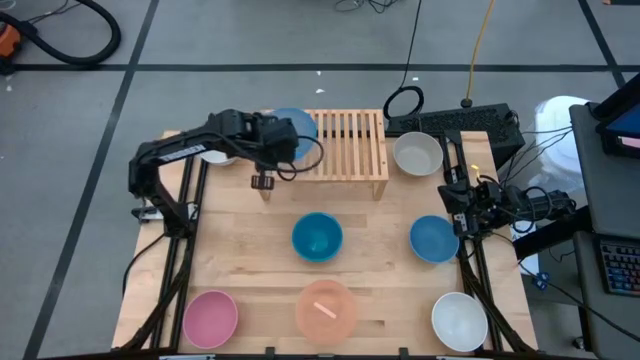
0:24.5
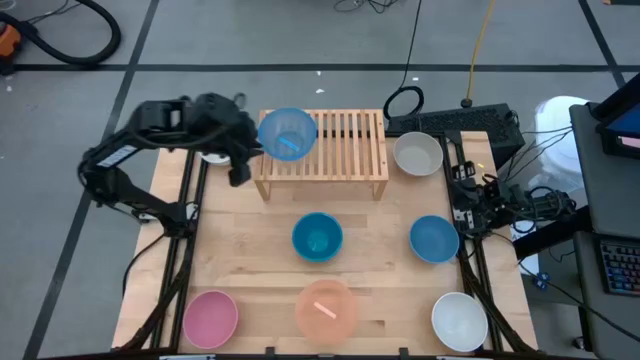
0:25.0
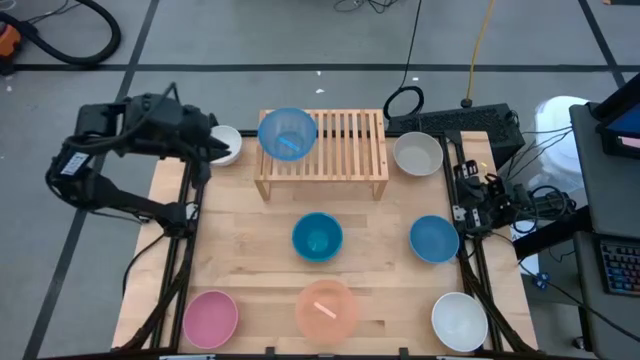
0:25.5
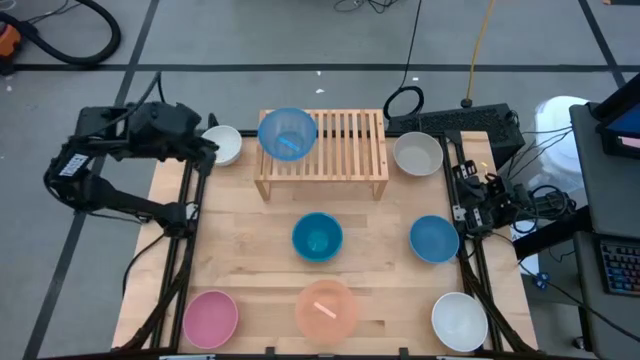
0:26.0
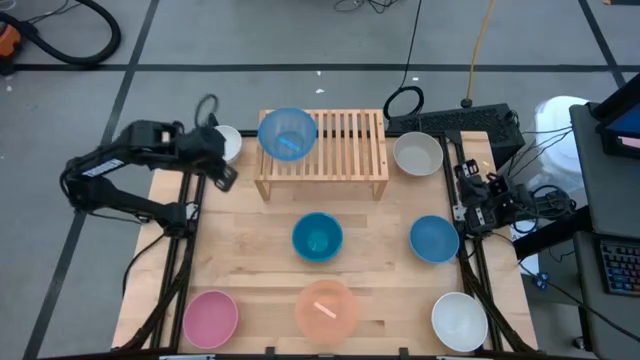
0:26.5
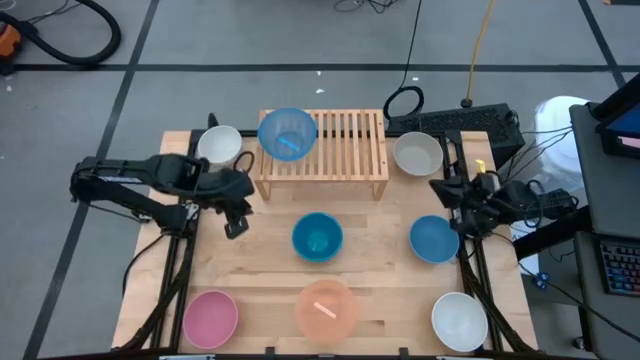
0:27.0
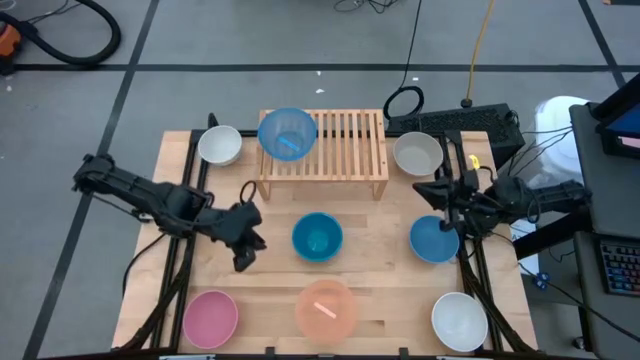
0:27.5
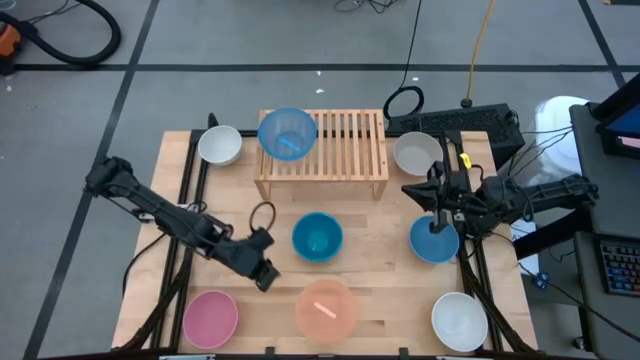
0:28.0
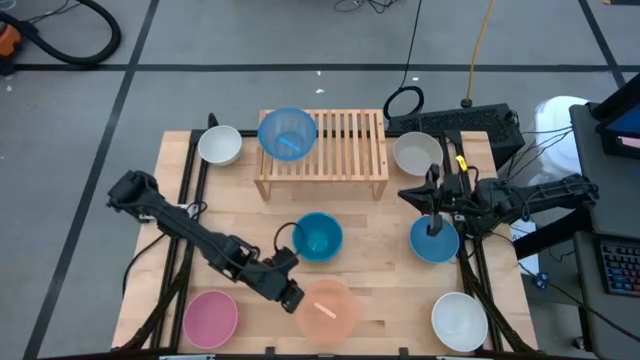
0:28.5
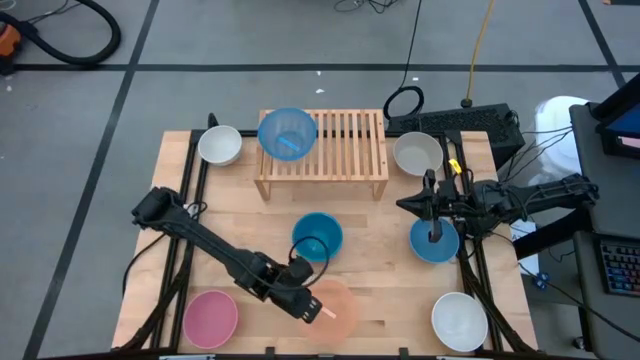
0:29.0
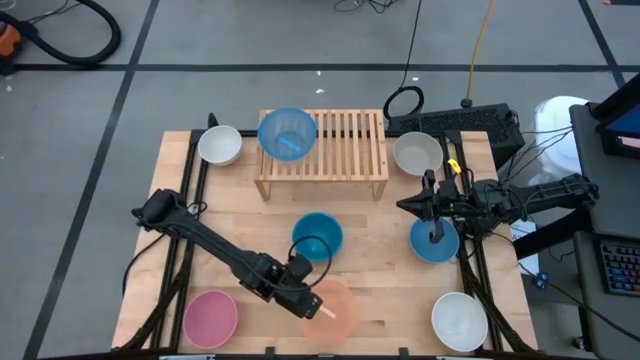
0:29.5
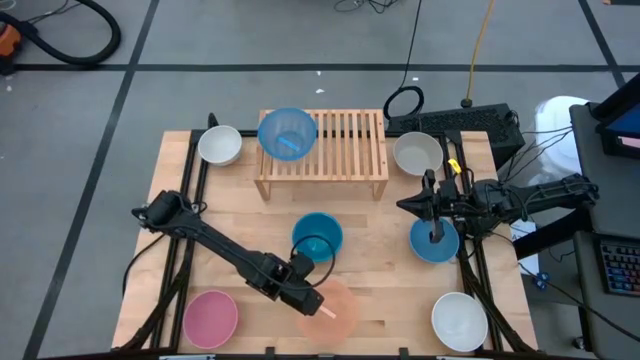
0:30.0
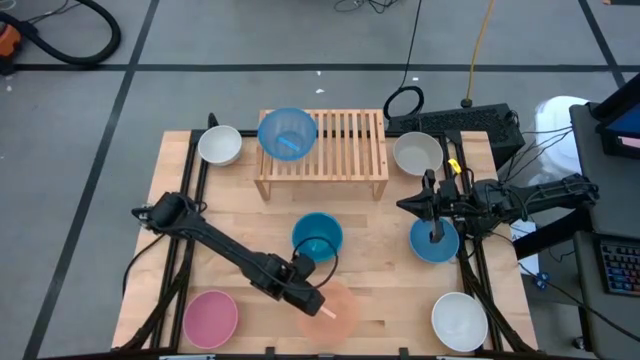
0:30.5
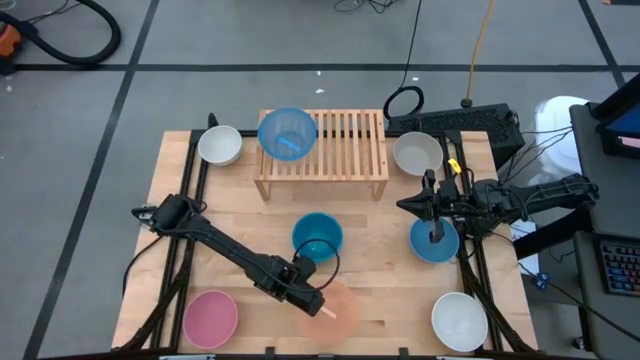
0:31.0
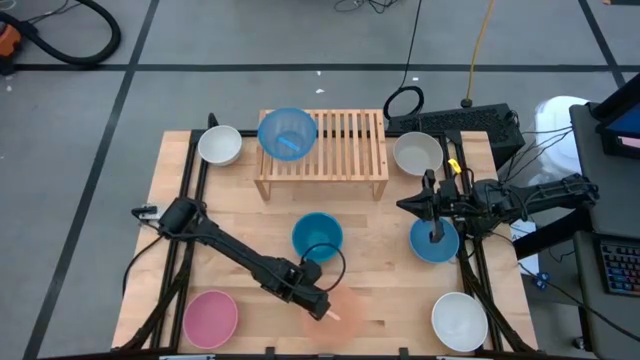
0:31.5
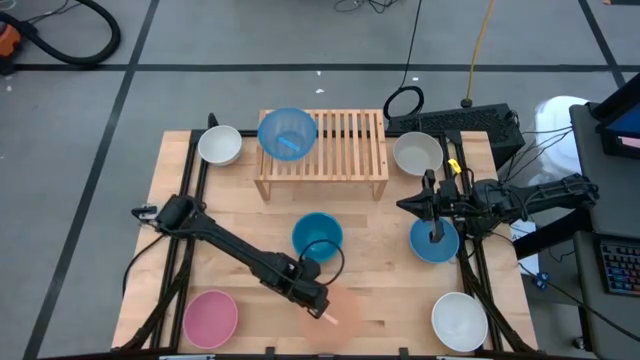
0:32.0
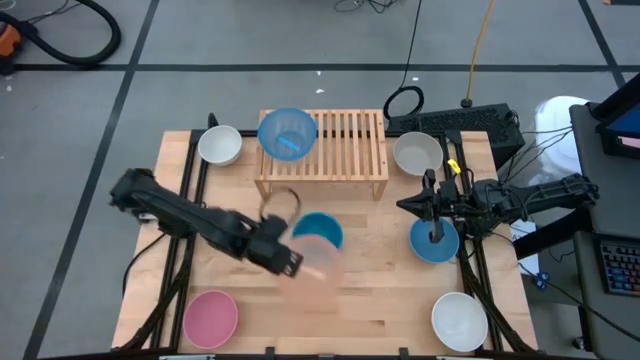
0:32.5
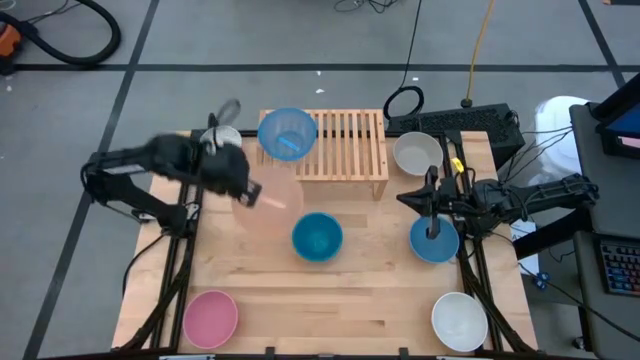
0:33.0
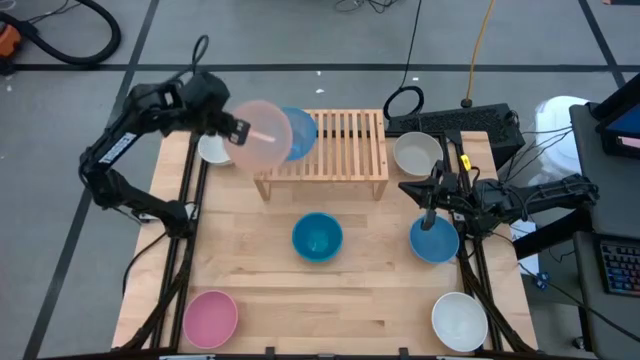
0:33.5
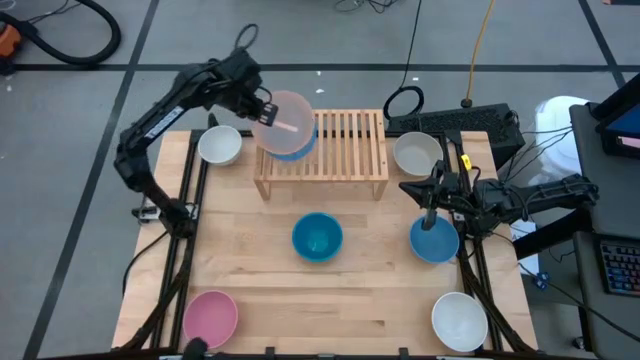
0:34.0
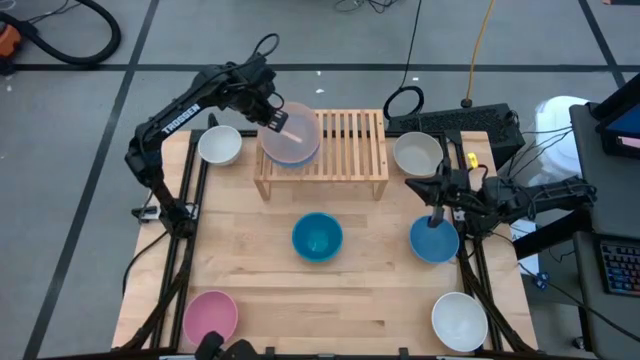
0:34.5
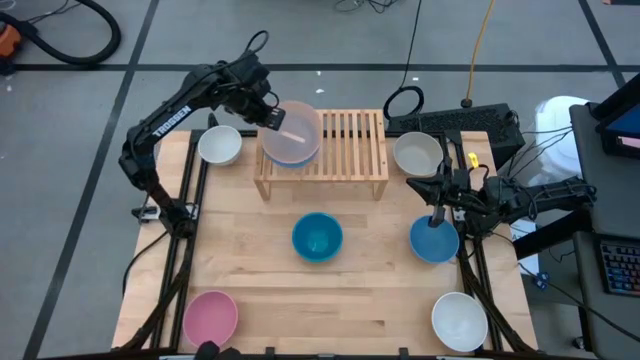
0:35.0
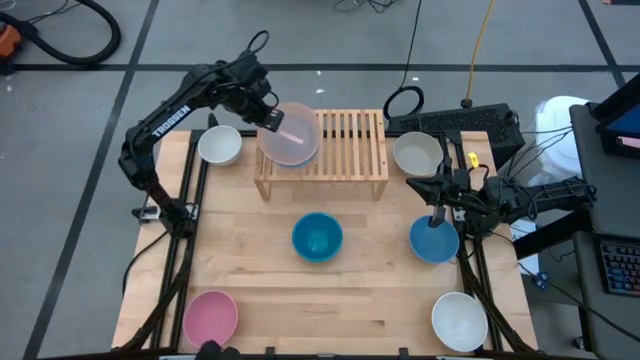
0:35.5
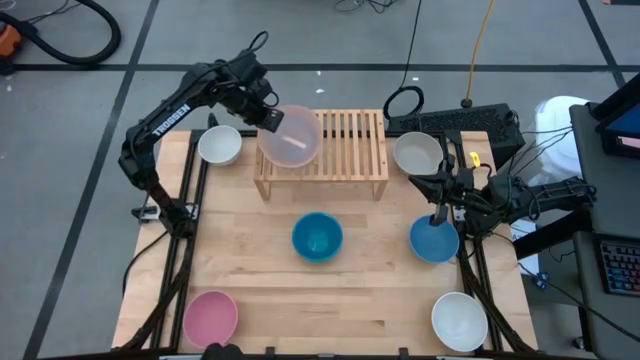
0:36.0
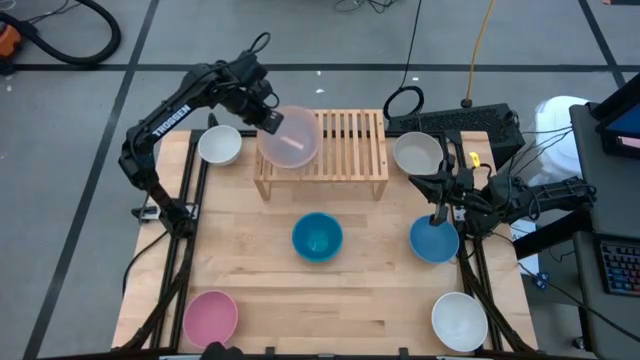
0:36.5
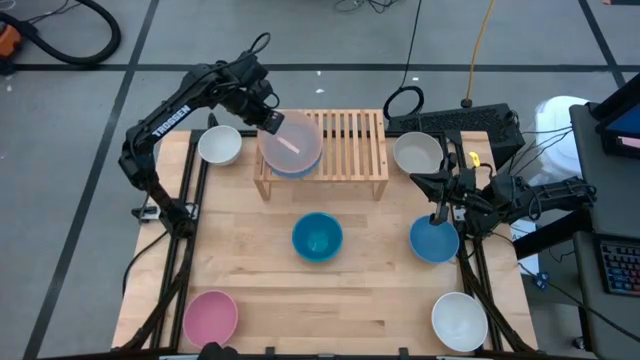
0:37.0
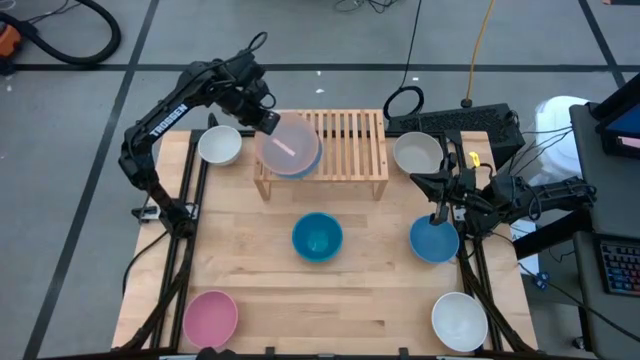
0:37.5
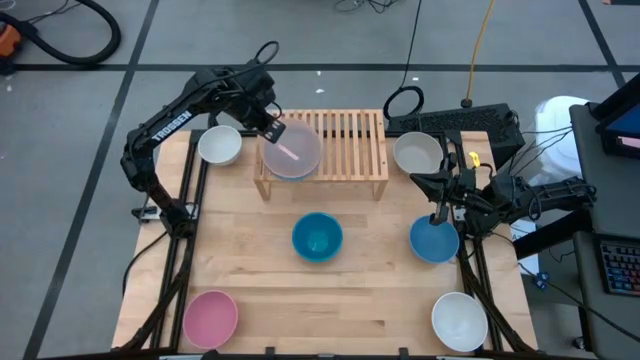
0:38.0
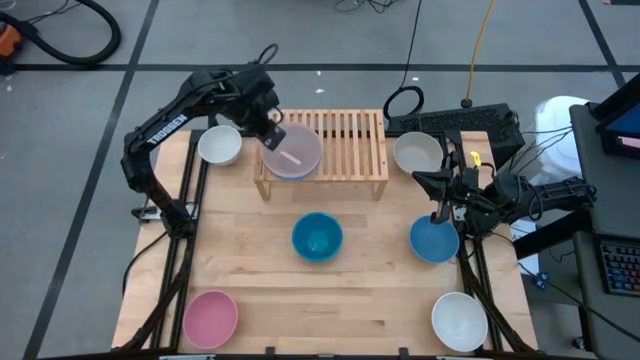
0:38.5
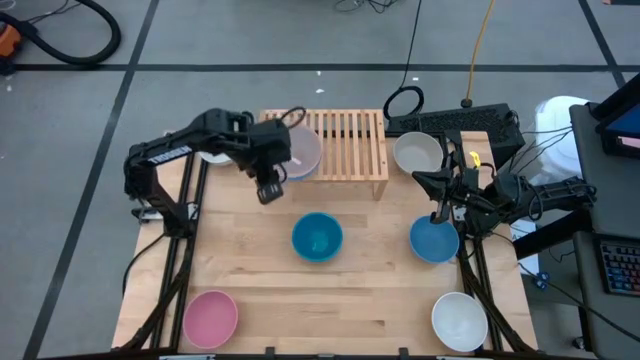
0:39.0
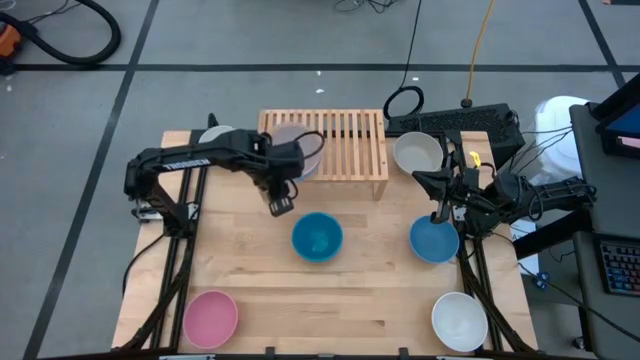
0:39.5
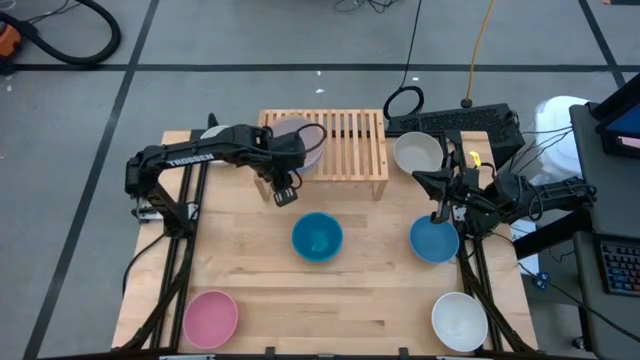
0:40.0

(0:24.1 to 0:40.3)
Task: Place and stack bowls onto a shelf
Stack the orange bowl on top of the light blue bowl on the shelf

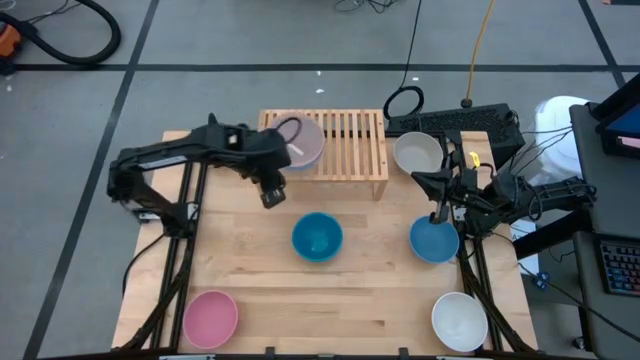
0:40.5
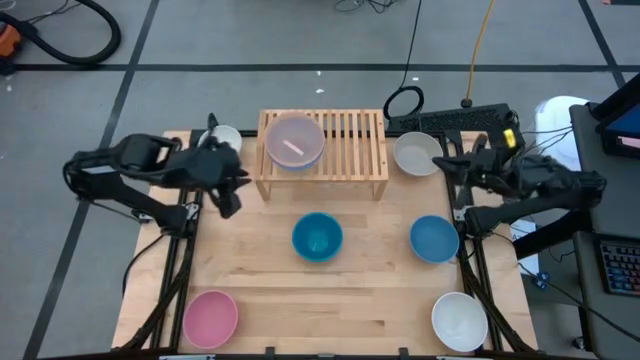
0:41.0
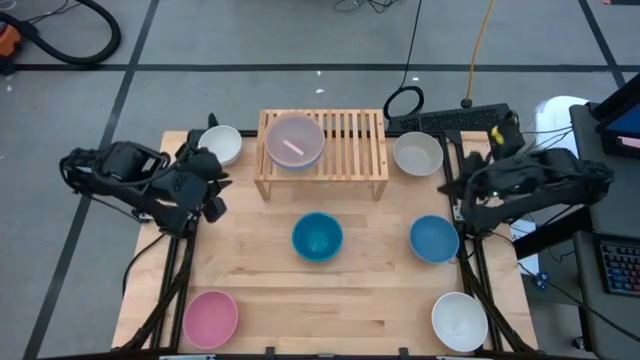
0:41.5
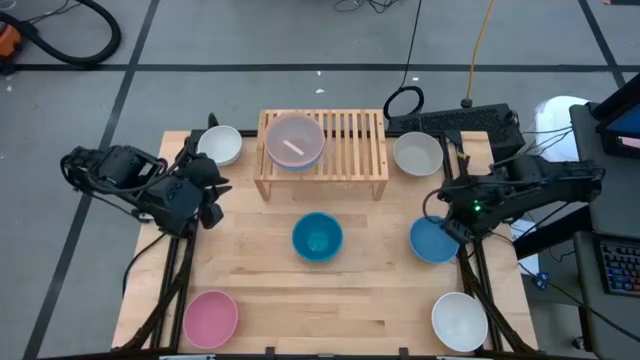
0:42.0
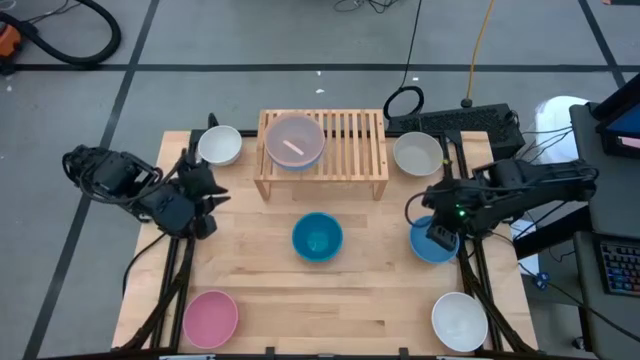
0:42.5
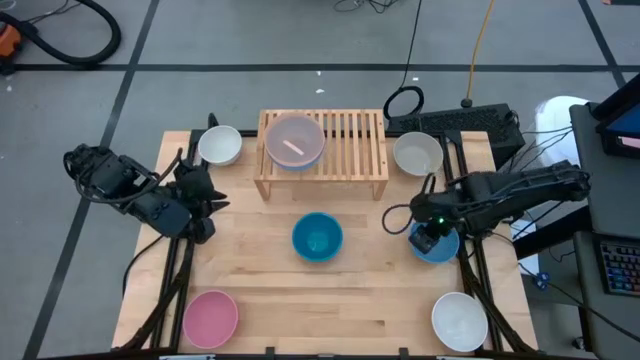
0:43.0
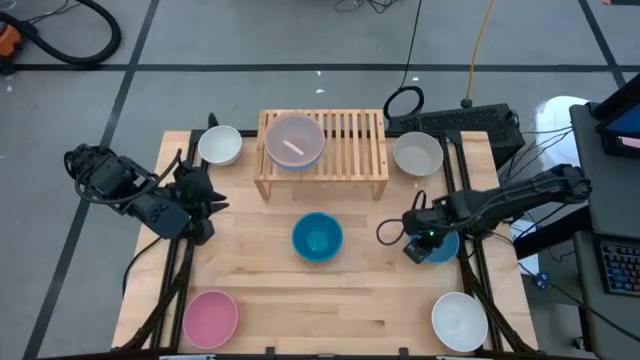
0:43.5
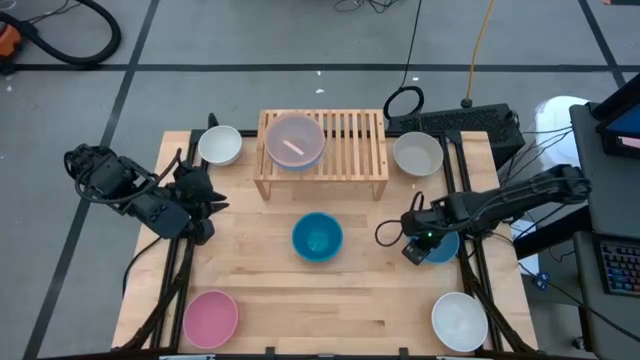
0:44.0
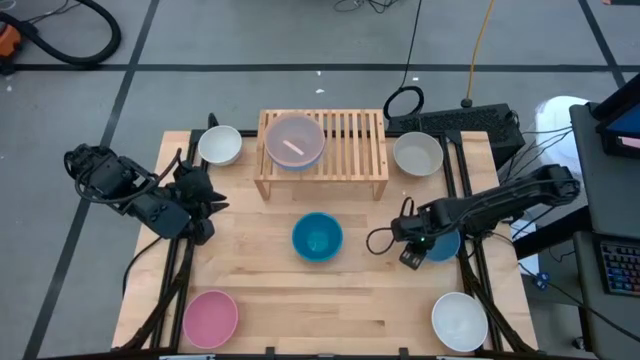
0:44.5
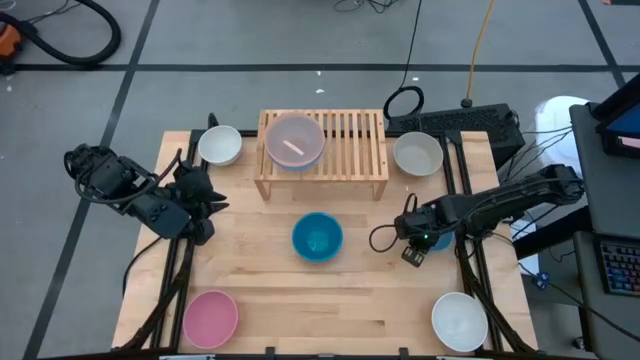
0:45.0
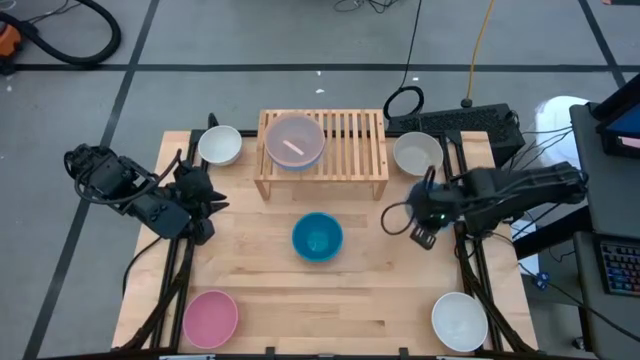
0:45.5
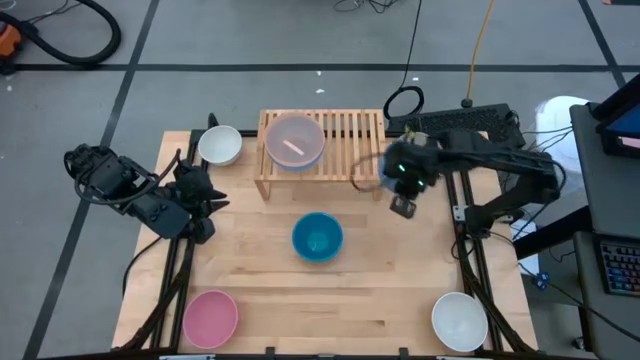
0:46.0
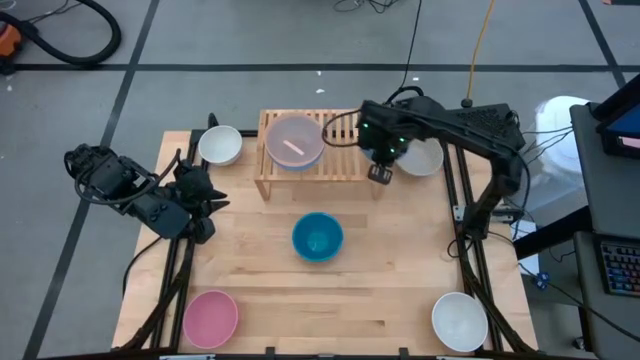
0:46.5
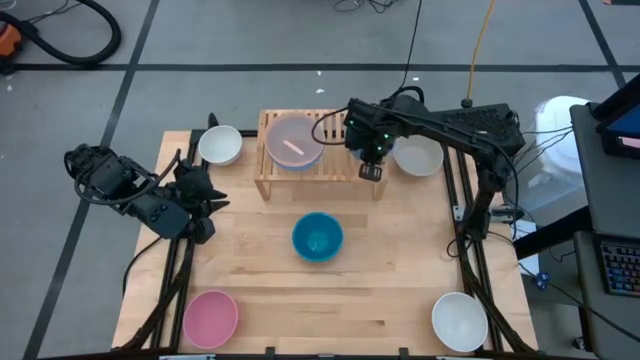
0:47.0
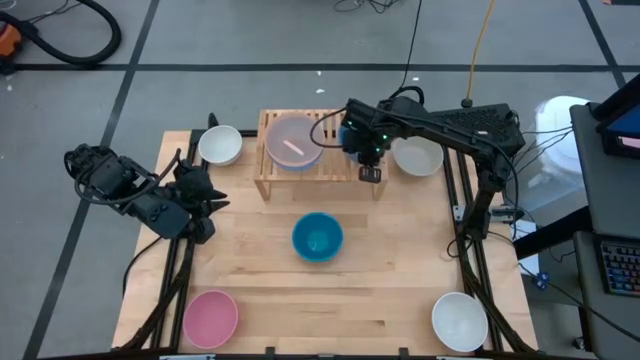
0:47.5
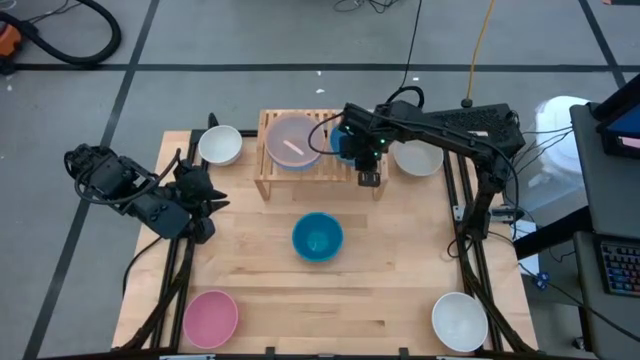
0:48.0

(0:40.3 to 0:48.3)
Put the right blue bowl on the shelf
